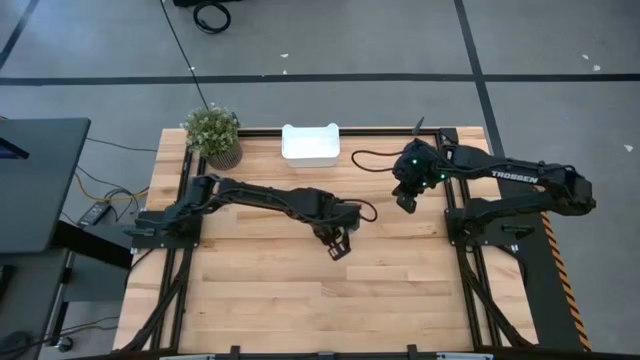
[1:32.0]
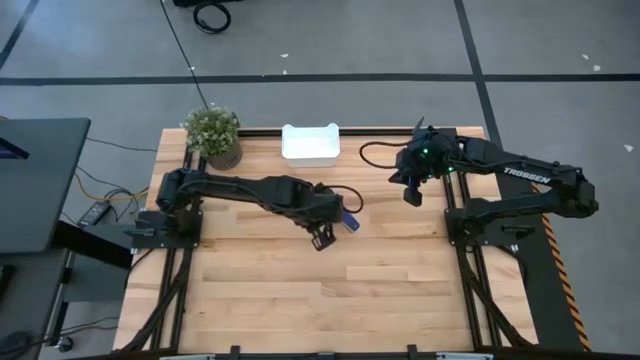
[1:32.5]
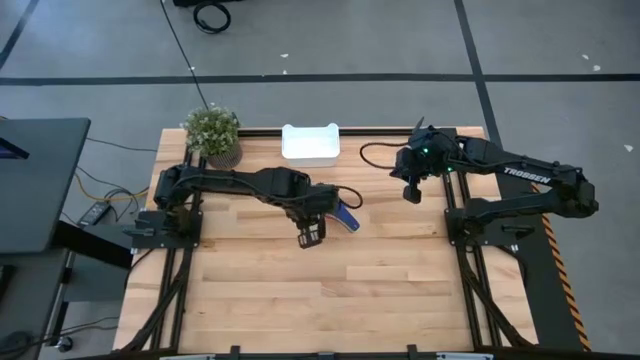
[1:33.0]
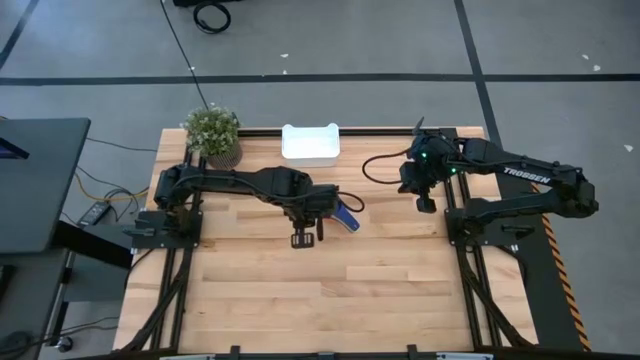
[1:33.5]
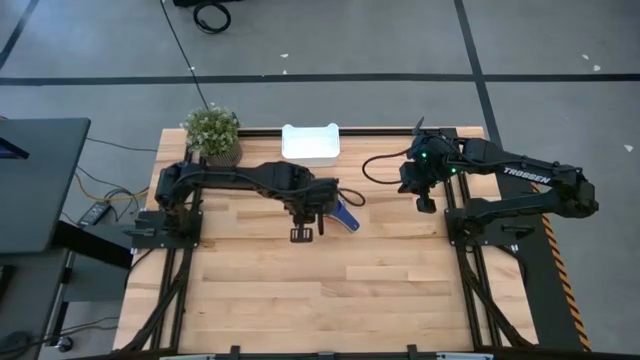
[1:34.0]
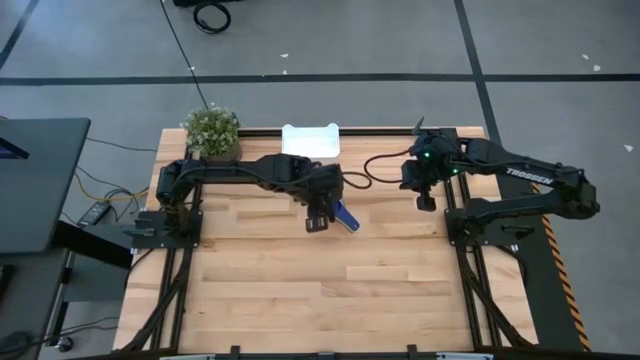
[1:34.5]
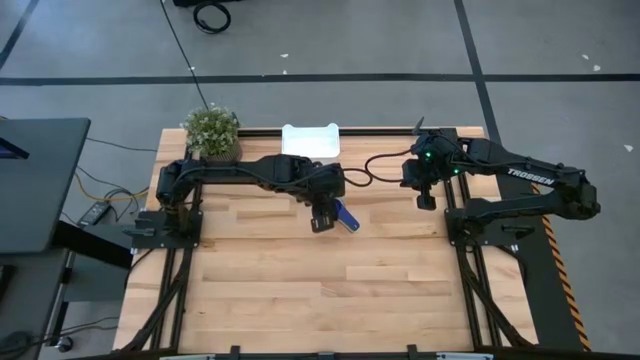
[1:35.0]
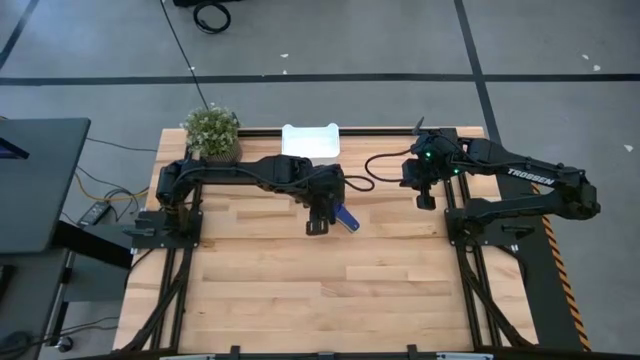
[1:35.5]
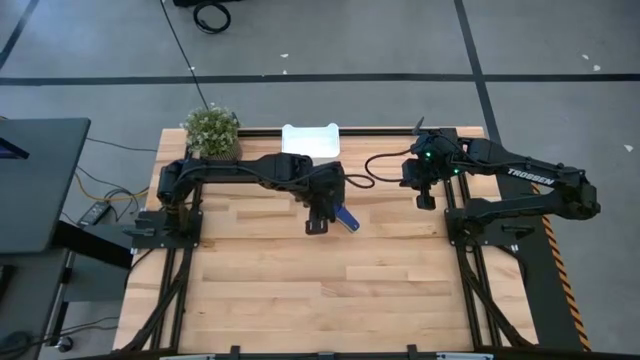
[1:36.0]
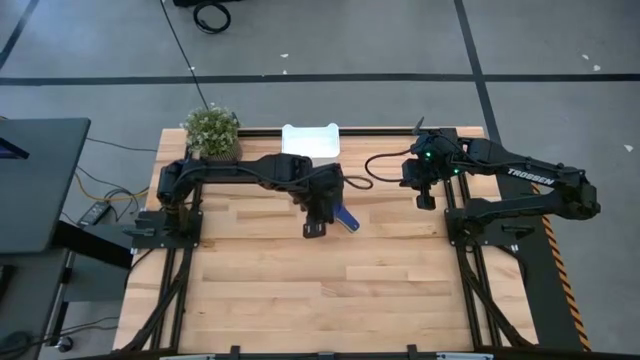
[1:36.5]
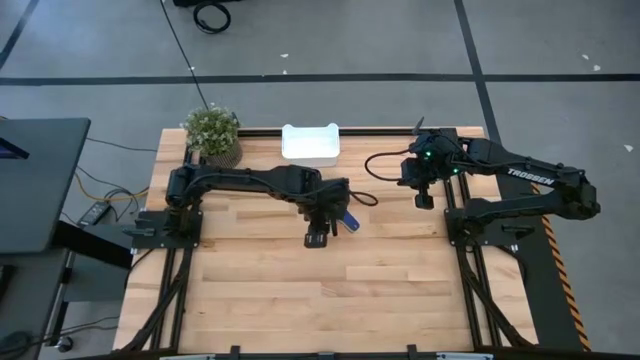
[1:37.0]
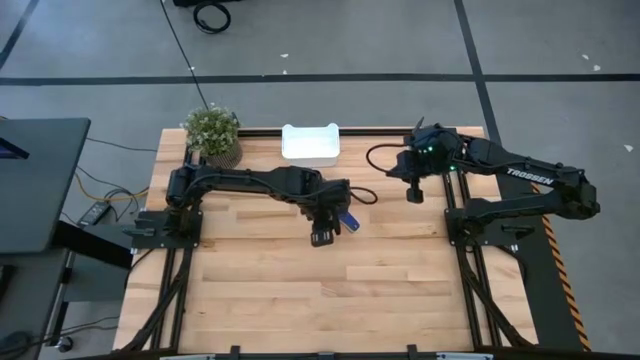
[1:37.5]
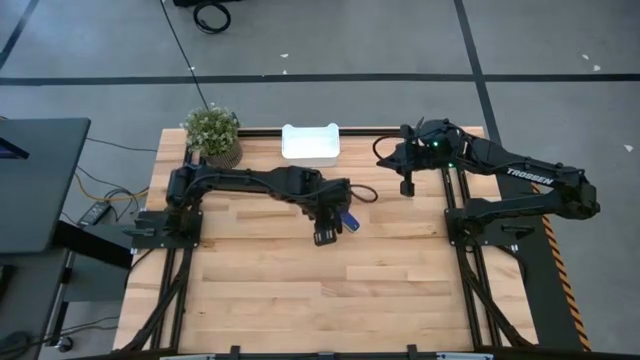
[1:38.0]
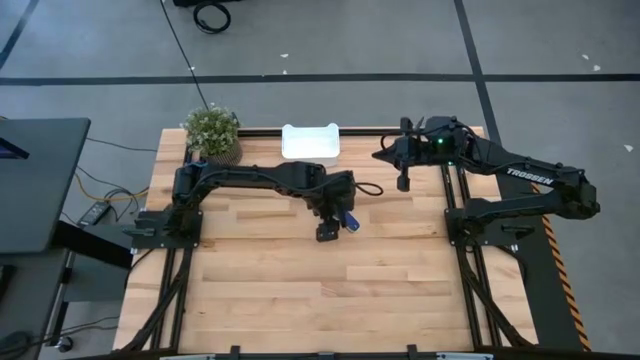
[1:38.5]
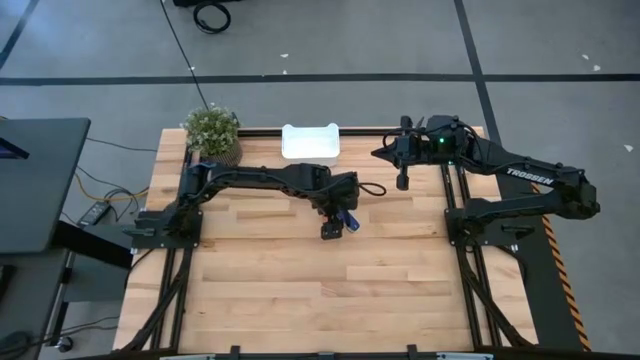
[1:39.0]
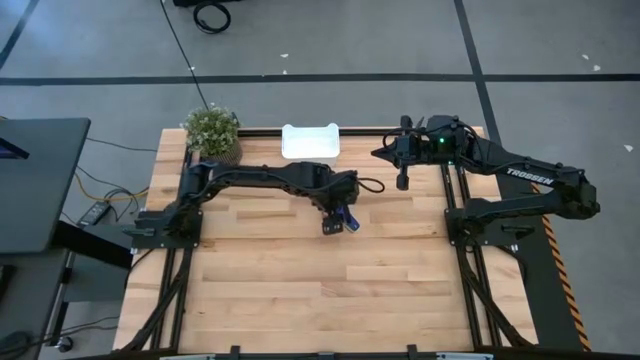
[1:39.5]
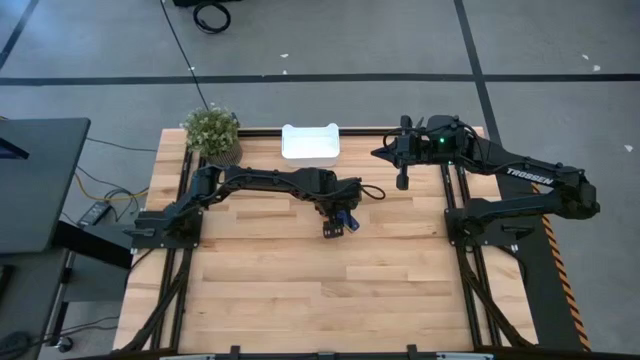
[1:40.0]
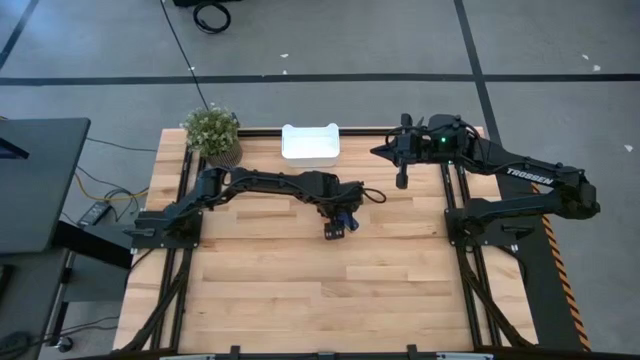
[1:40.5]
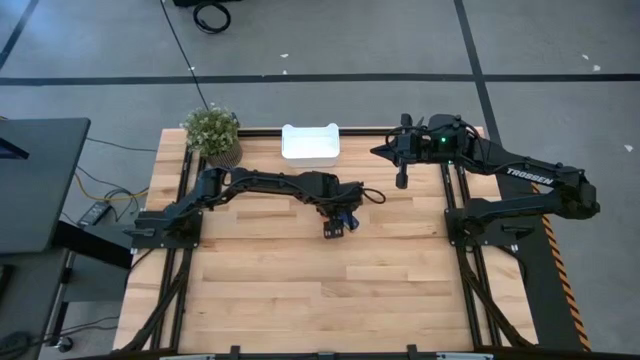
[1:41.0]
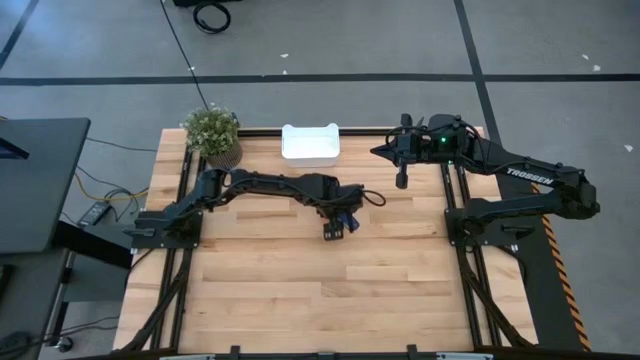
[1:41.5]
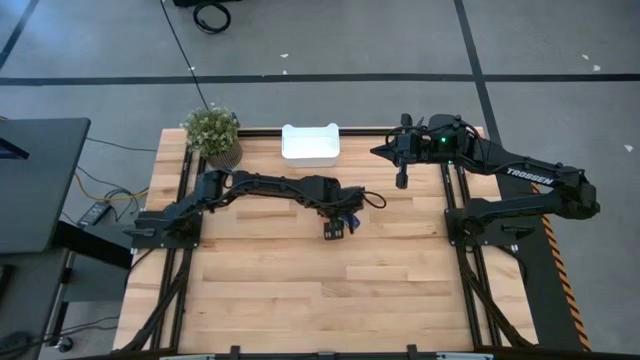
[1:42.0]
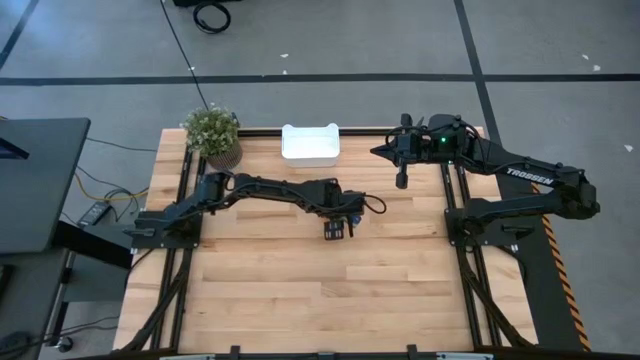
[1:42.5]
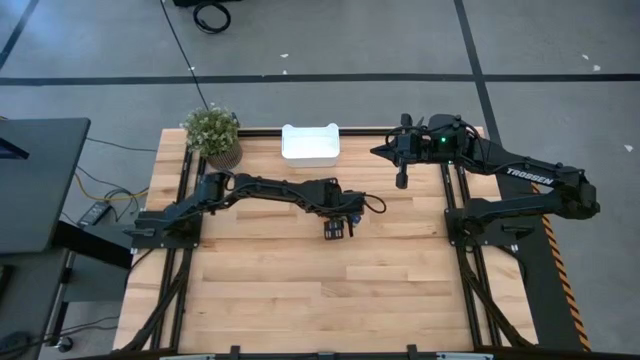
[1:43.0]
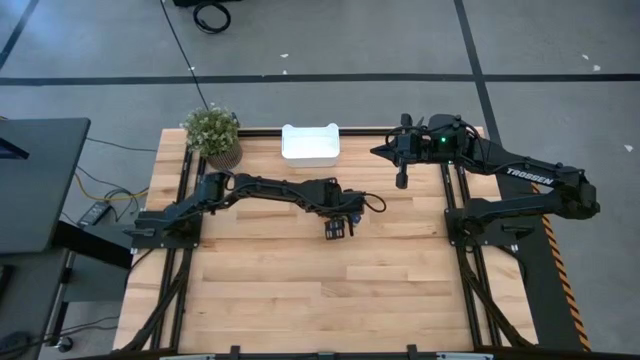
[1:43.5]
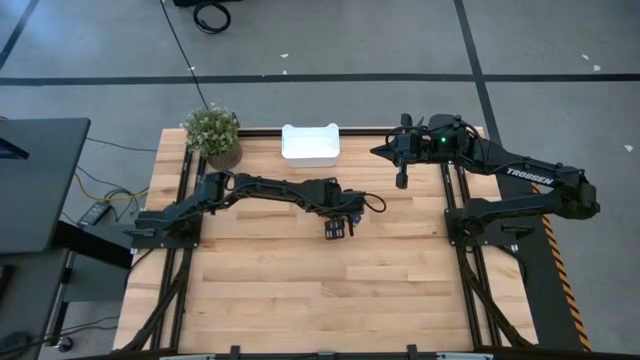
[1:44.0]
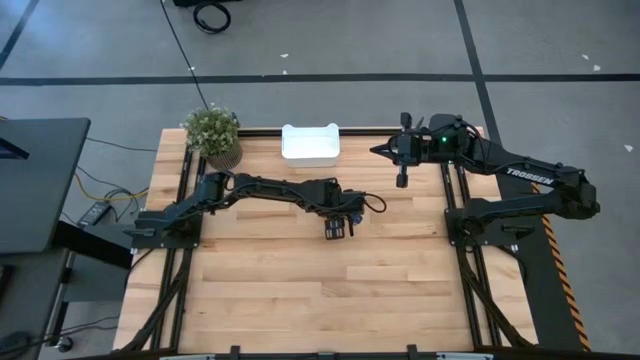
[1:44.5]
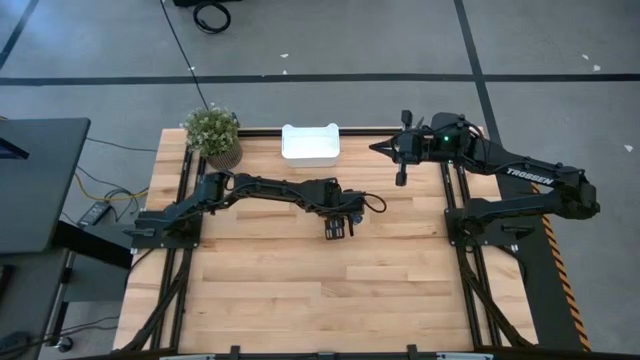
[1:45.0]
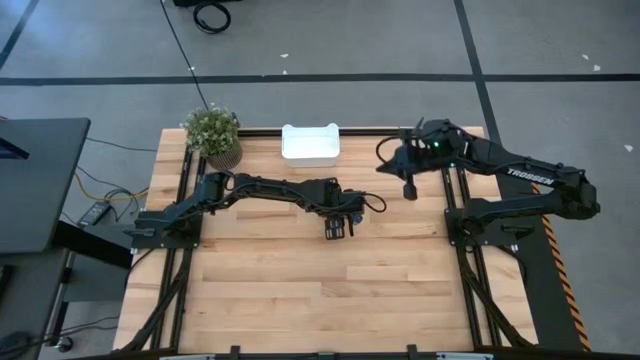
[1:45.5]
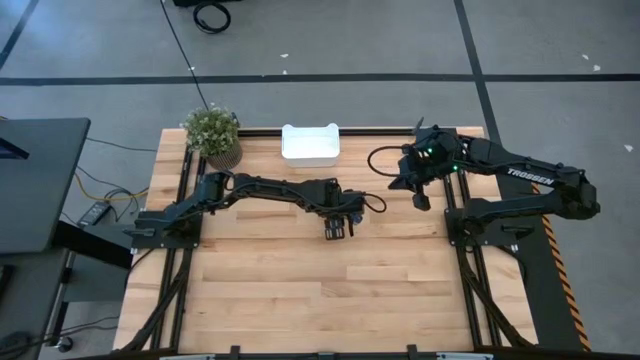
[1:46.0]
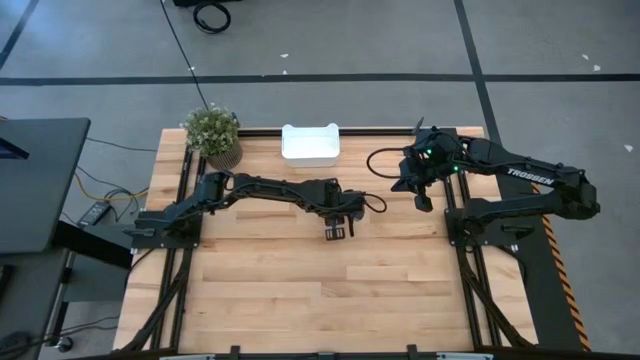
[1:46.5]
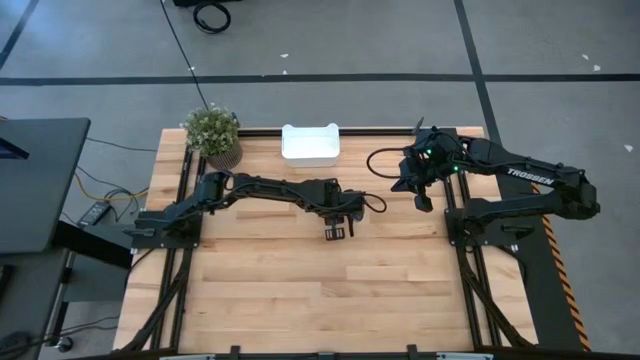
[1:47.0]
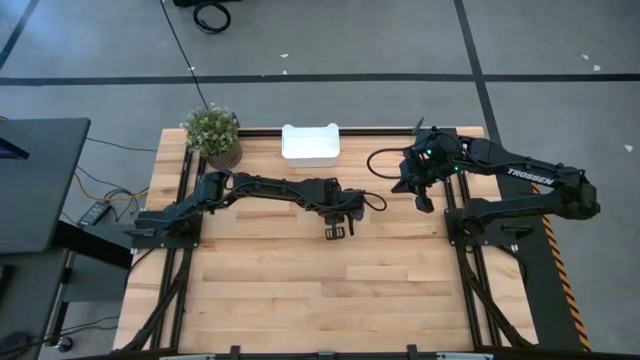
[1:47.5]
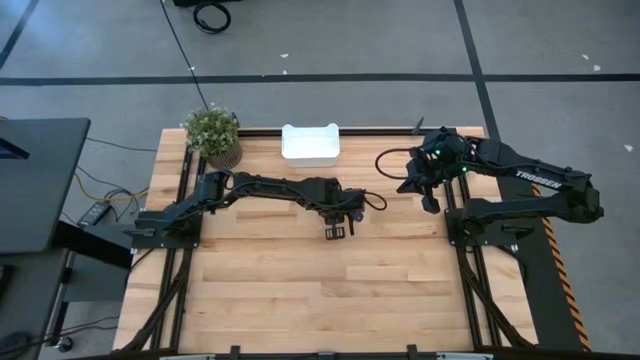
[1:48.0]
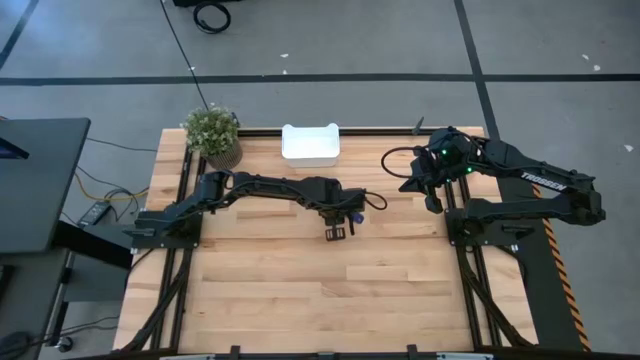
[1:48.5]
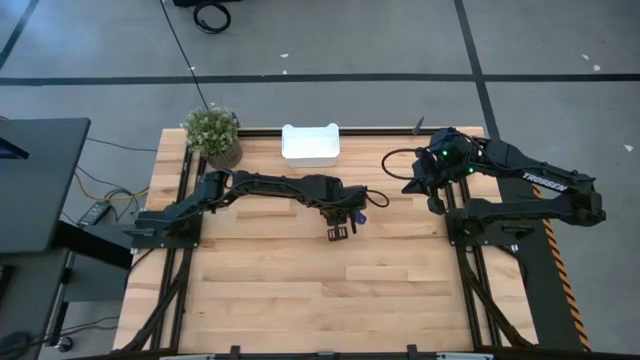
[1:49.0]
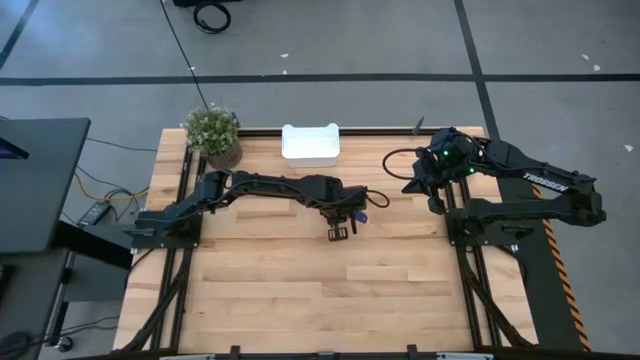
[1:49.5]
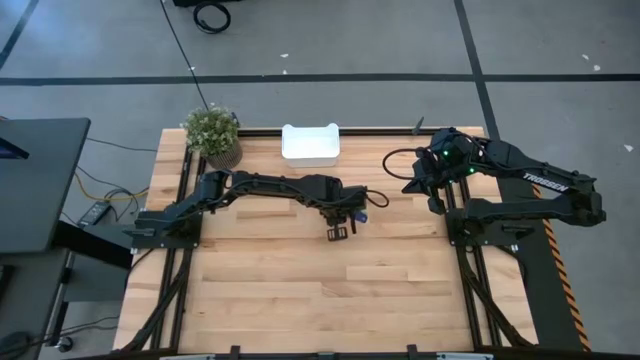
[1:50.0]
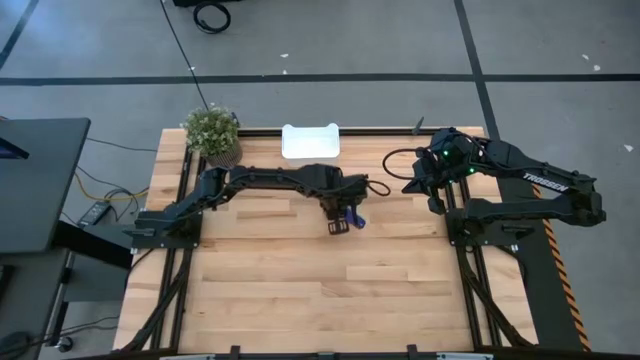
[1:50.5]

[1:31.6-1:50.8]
Task: Nest measuring cups in basket
Put the nested measuring cups into the white bin
